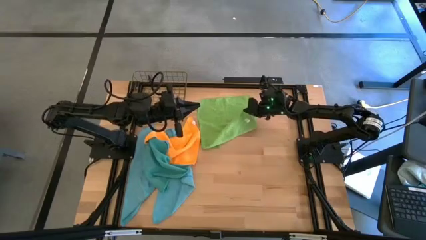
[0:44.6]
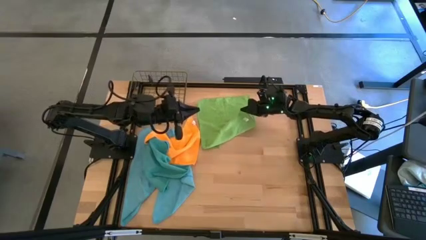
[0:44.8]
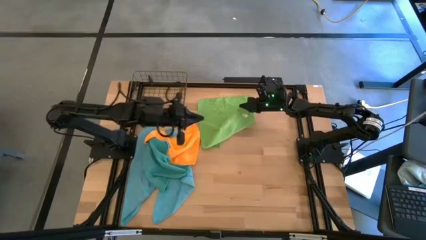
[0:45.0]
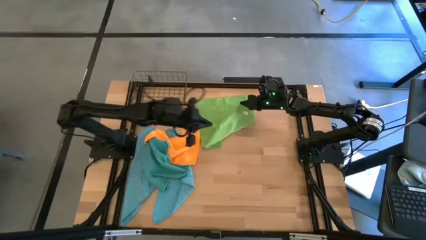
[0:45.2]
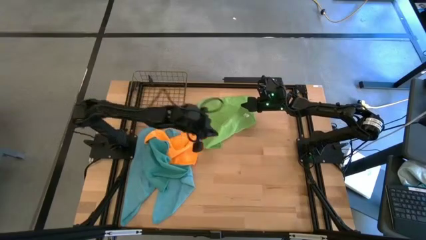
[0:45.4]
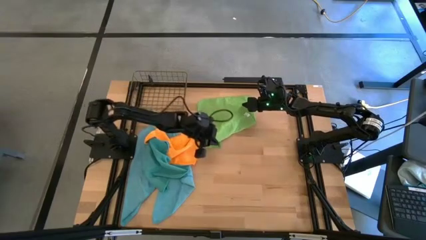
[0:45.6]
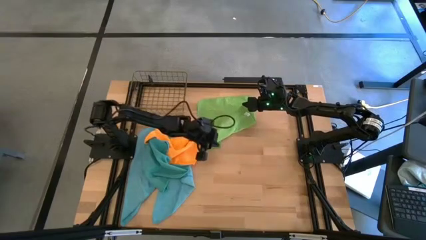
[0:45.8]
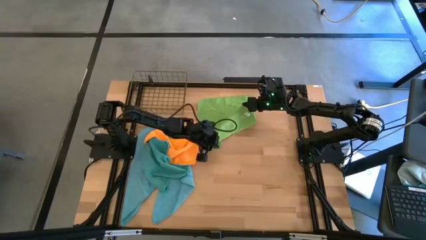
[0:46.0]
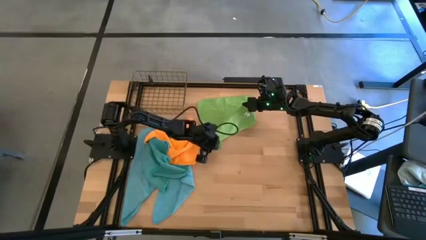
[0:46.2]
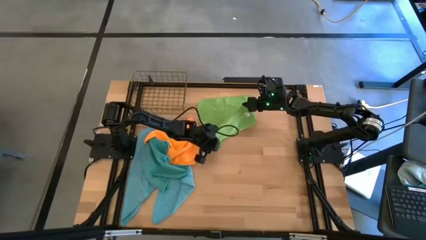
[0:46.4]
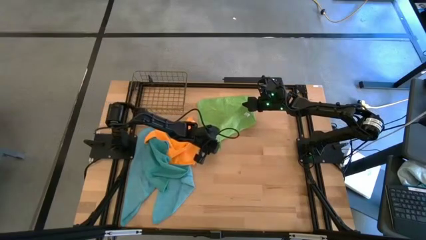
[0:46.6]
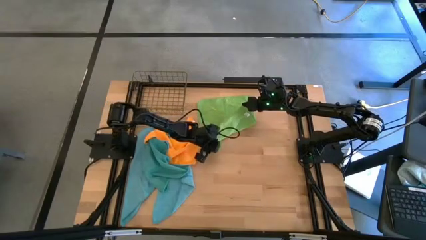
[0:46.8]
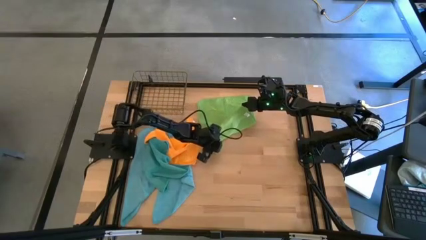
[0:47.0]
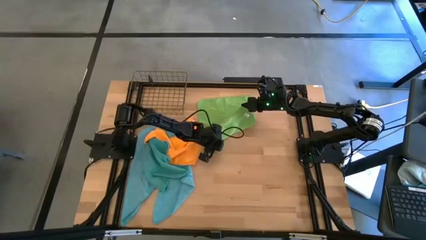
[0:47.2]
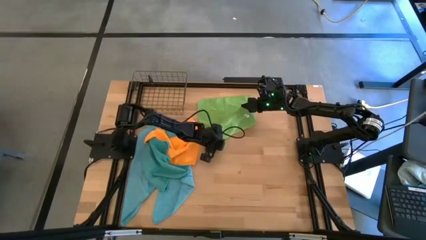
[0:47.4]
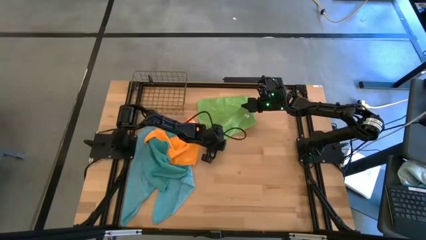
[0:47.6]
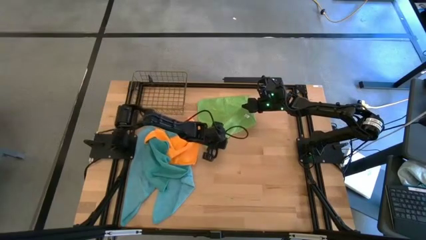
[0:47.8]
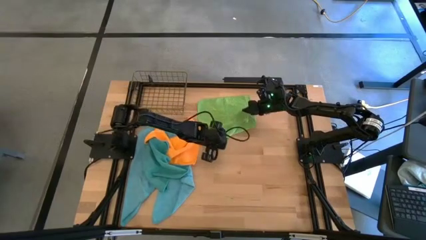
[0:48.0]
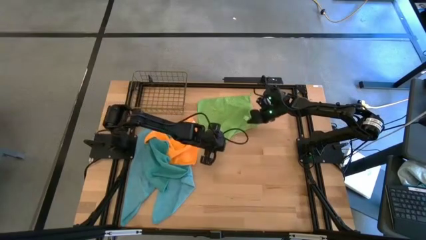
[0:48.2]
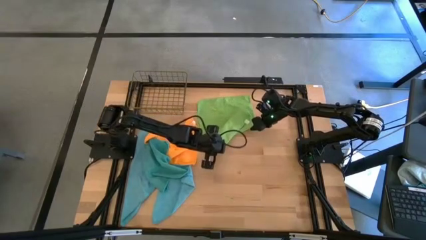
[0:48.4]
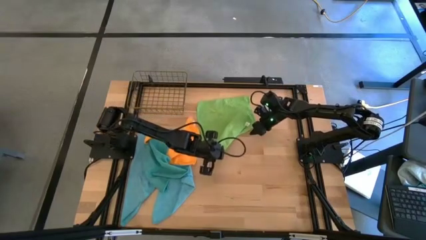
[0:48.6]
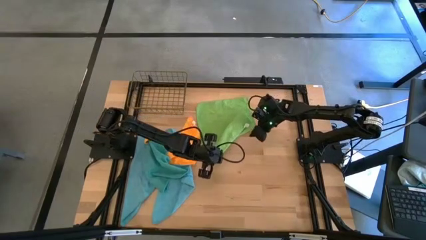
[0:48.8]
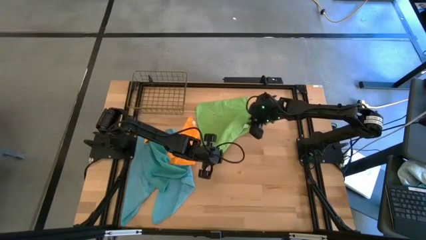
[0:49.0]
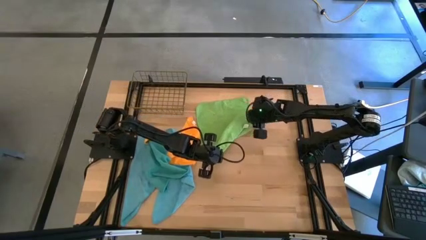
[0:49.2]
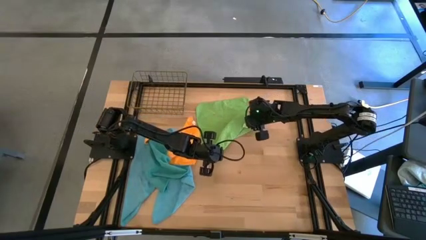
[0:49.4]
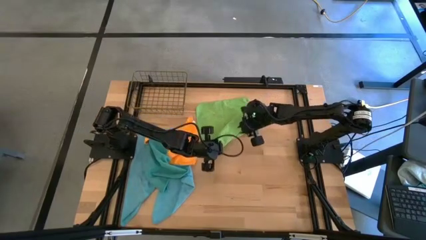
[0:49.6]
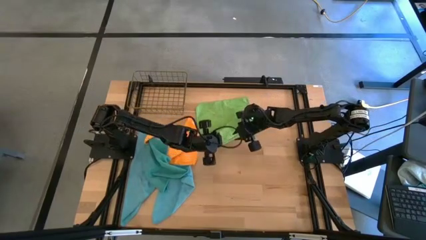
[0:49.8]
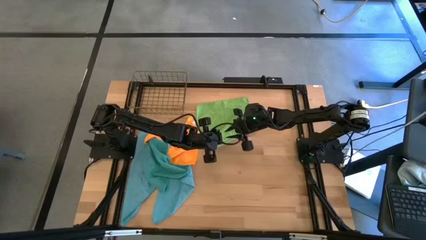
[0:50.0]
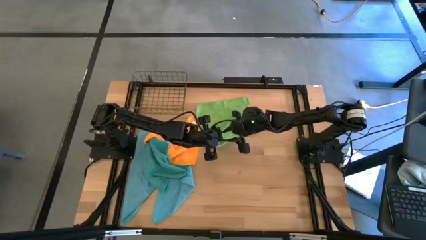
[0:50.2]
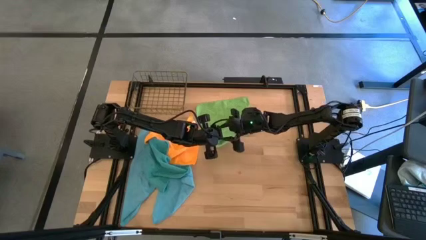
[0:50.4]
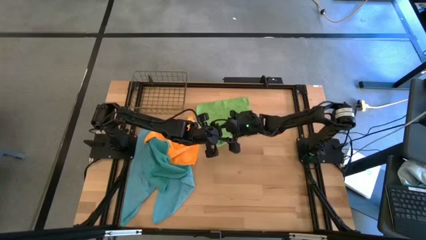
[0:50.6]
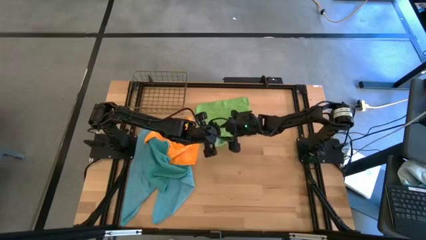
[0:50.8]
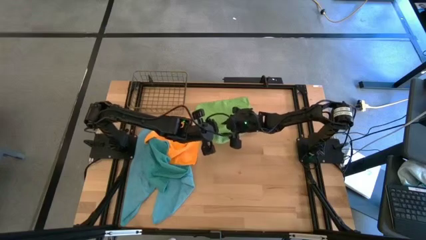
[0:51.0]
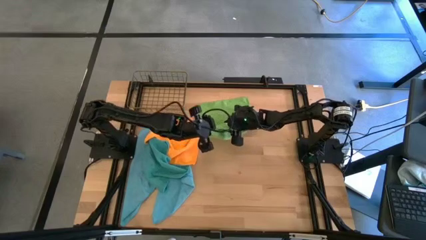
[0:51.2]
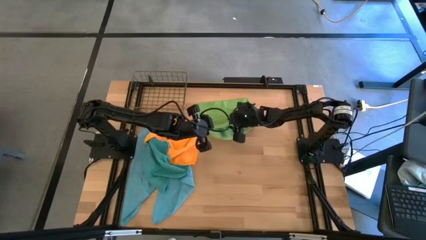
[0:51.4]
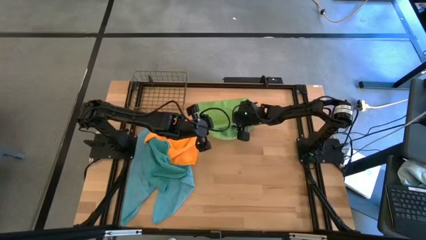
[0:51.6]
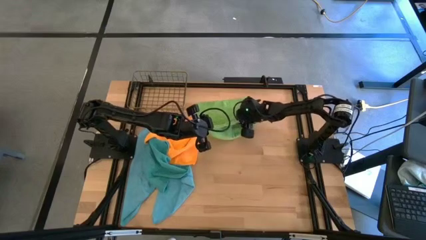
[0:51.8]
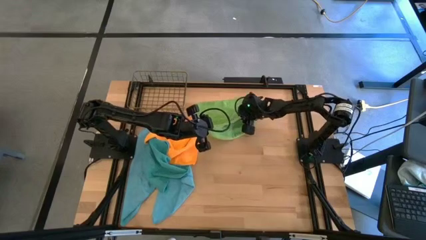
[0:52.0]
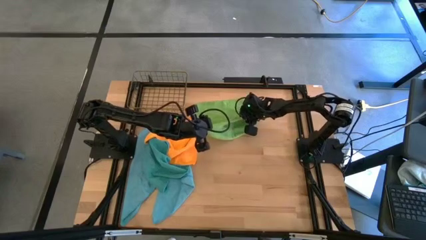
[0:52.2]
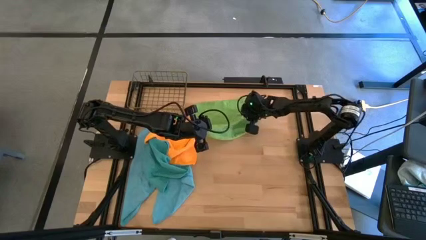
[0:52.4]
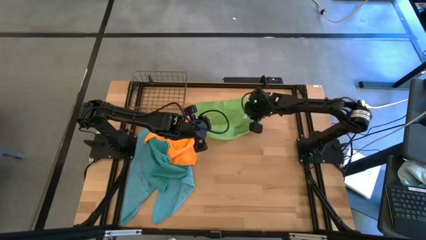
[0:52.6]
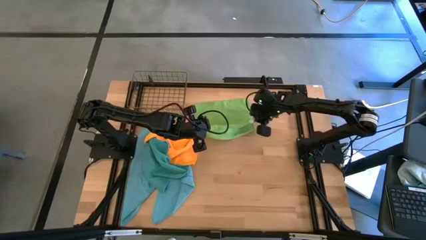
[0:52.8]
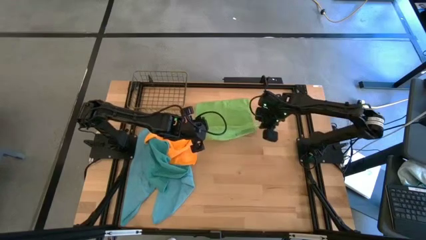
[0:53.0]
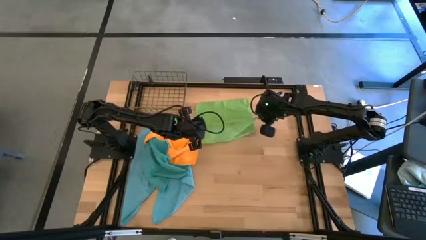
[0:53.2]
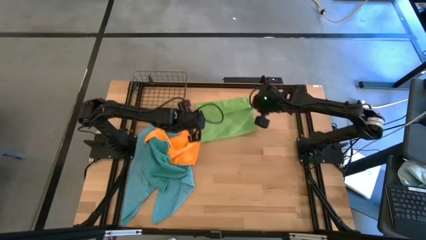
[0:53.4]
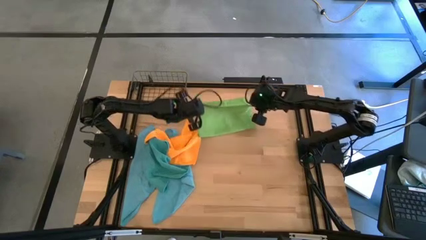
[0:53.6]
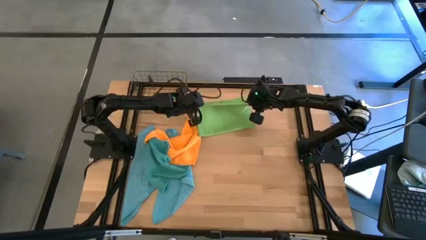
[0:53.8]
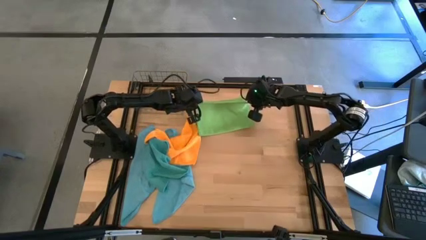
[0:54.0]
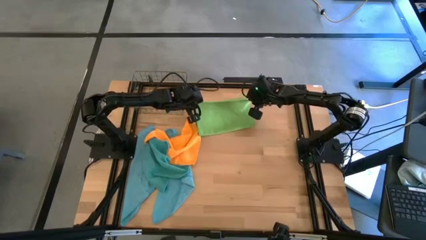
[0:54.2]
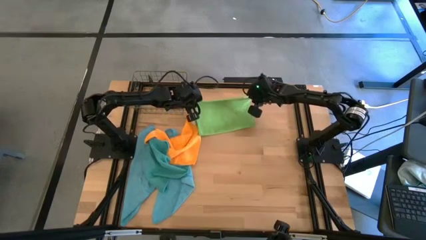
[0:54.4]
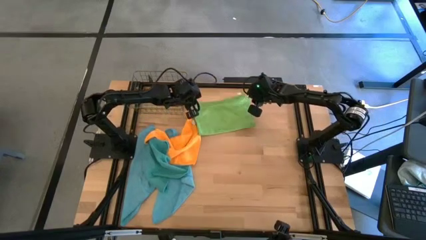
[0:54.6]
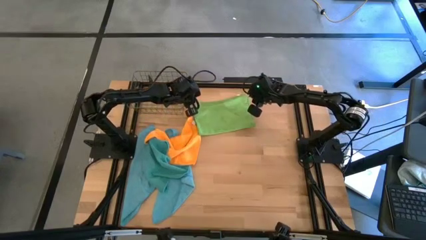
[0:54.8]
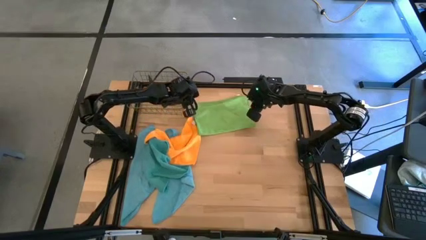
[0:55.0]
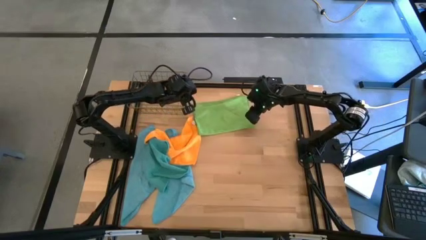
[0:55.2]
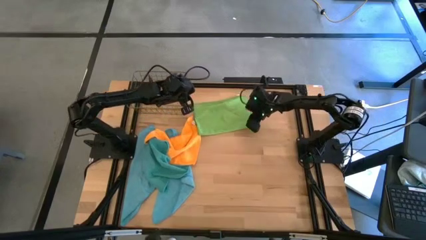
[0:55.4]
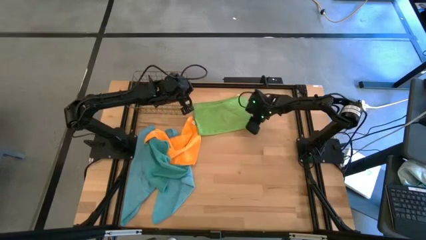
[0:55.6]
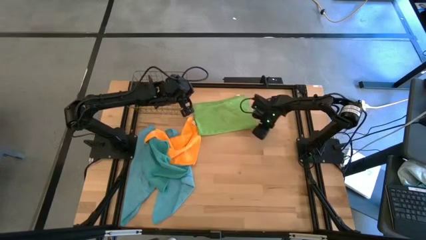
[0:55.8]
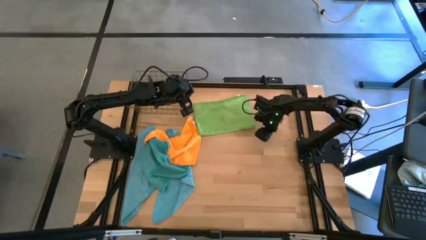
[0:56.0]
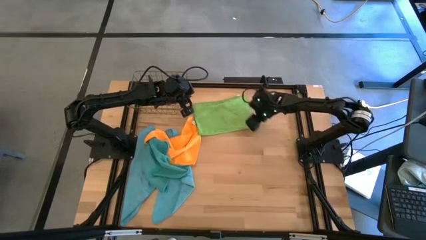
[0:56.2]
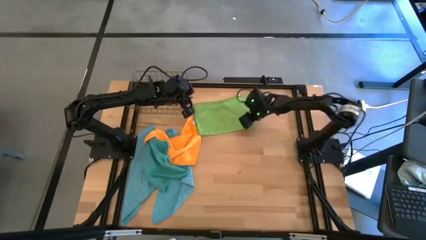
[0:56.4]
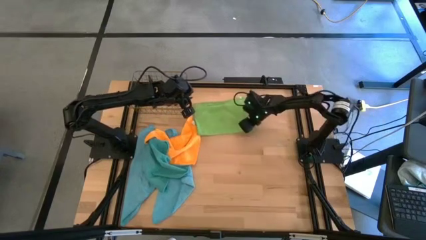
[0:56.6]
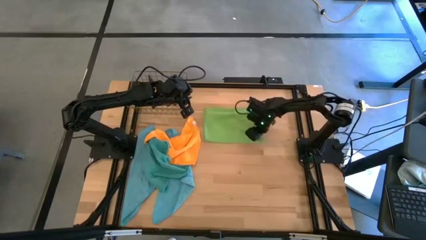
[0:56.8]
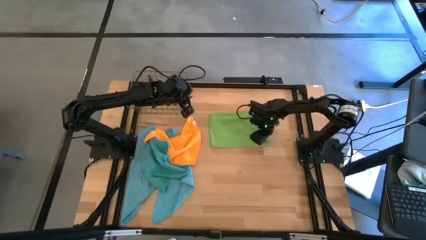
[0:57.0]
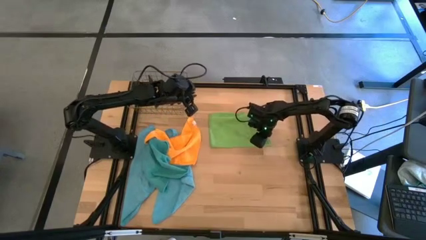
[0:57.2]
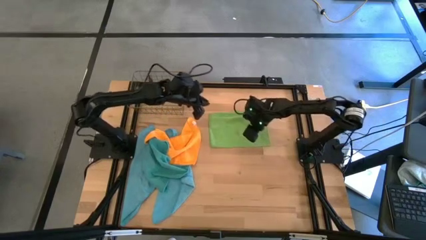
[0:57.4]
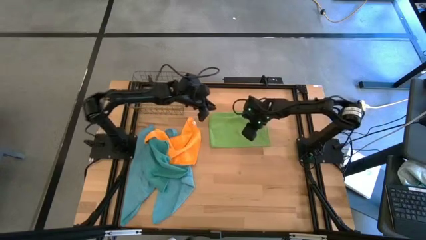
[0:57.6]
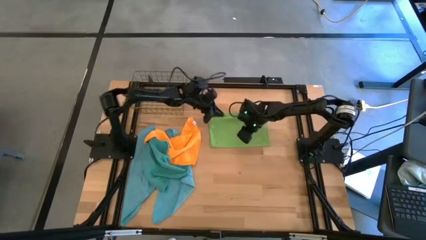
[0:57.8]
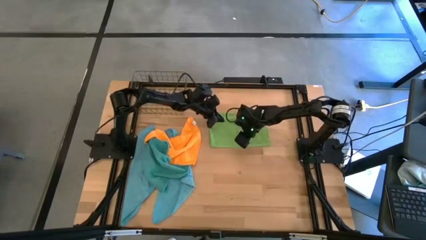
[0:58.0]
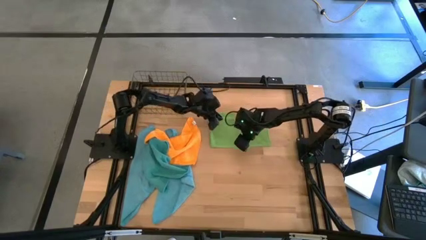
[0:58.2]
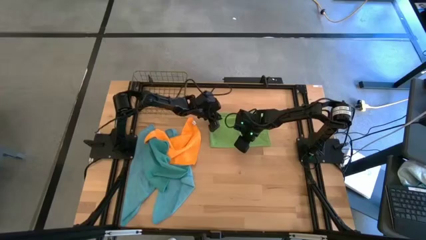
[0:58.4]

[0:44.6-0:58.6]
Task: Fold microfiber towels
Fold the green microfiber cloth

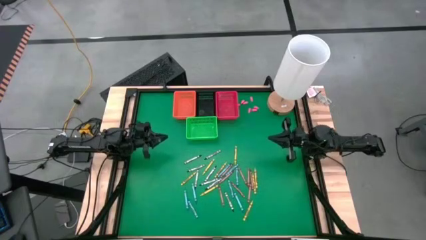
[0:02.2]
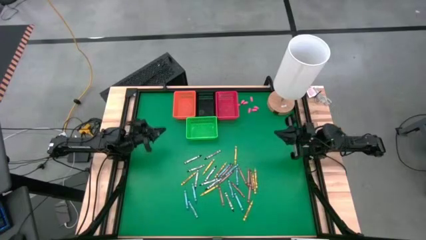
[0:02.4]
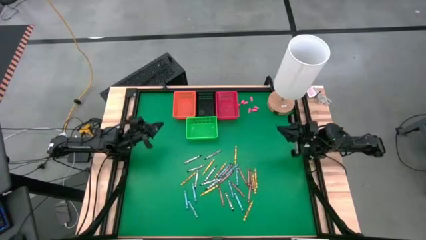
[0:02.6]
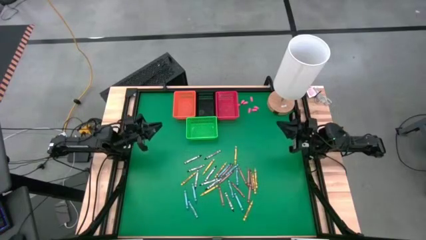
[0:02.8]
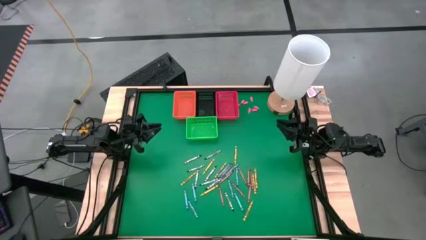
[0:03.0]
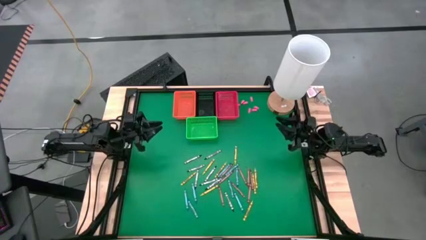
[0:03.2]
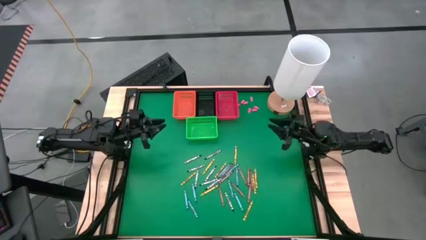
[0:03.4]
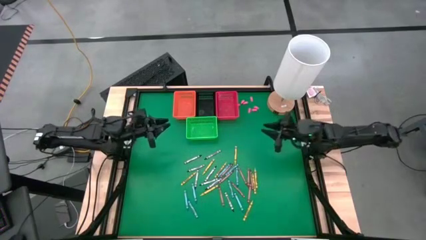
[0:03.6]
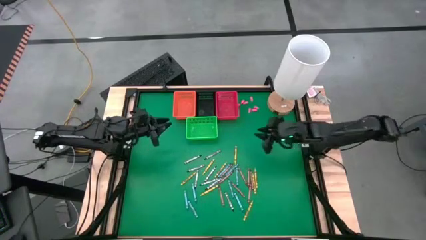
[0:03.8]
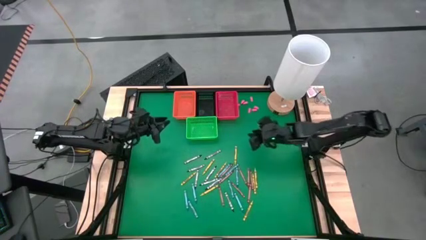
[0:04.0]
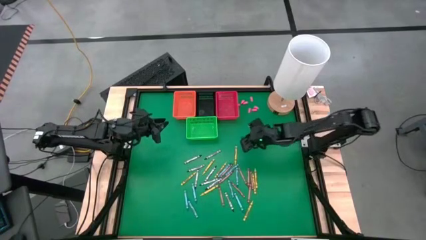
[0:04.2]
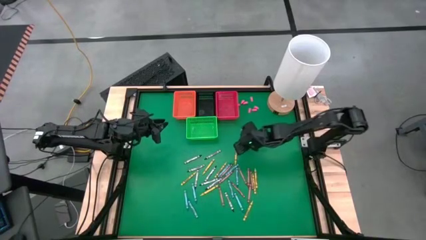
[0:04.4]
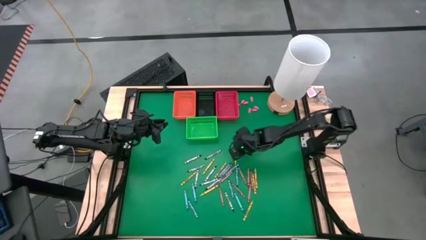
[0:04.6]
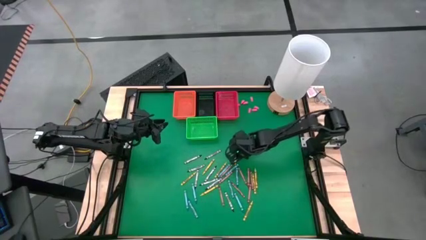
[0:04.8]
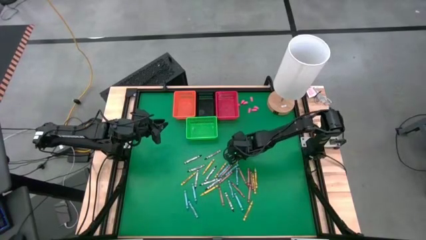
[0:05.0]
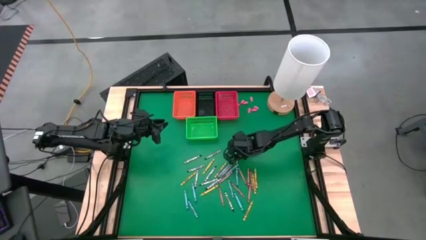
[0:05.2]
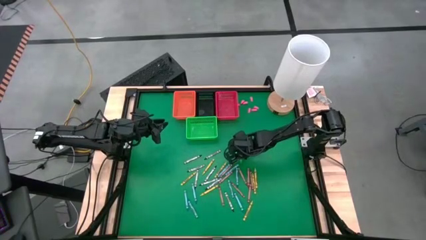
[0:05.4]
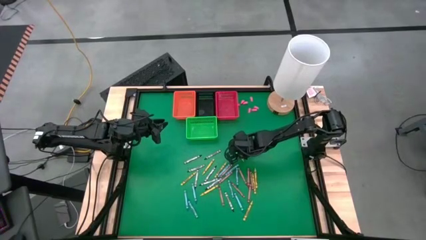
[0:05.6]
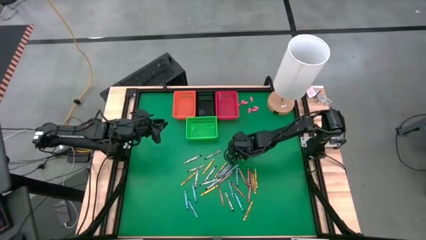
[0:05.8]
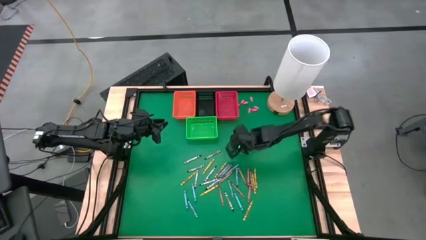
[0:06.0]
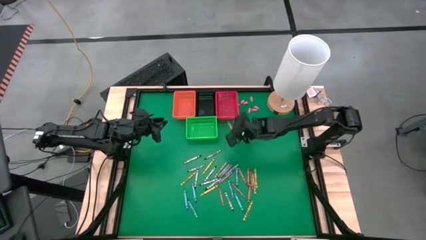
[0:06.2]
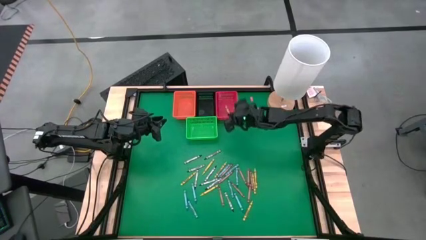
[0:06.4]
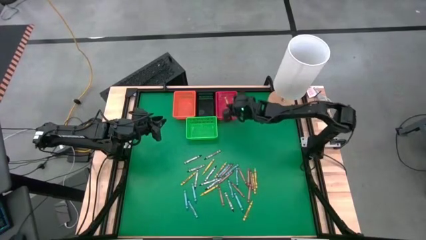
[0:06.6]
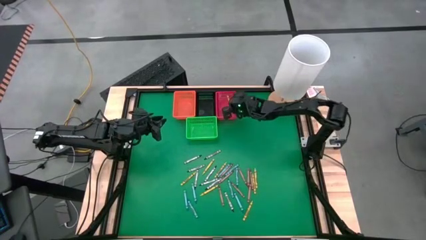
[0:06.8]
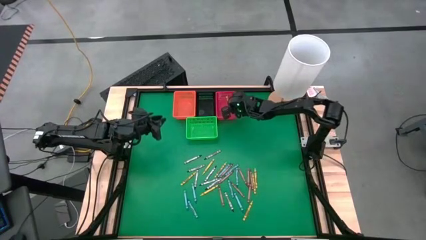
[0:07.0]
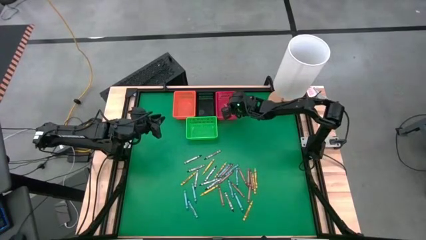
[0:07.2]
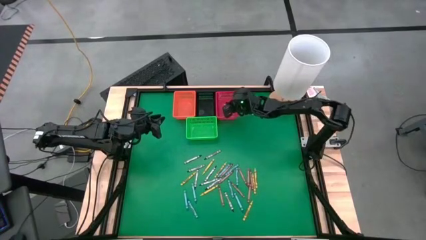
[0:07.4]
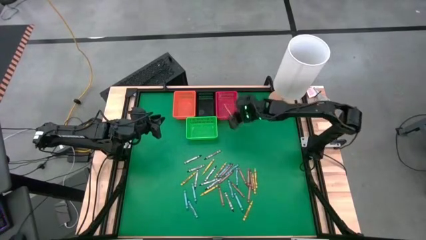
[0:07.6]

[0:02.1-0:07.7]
Task: Sort crayons
Put a yellow crayon in the red basket
